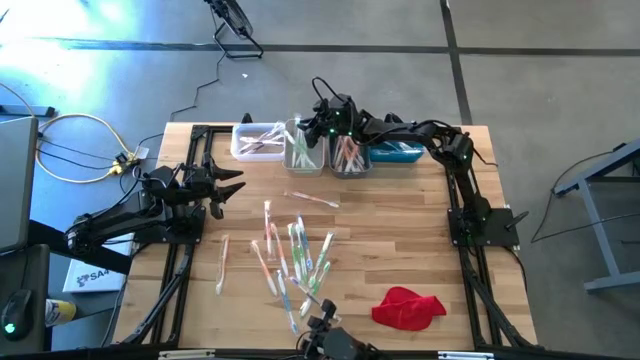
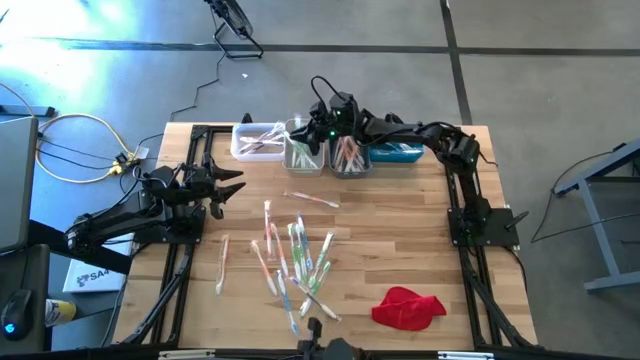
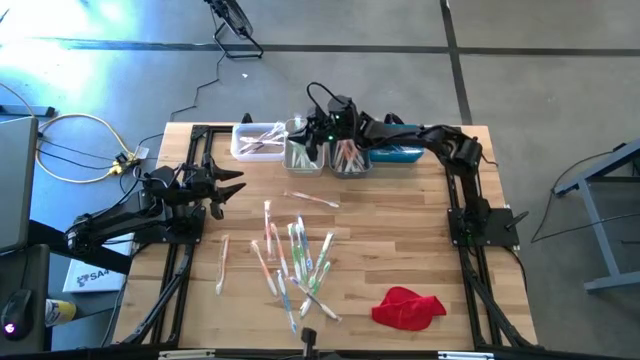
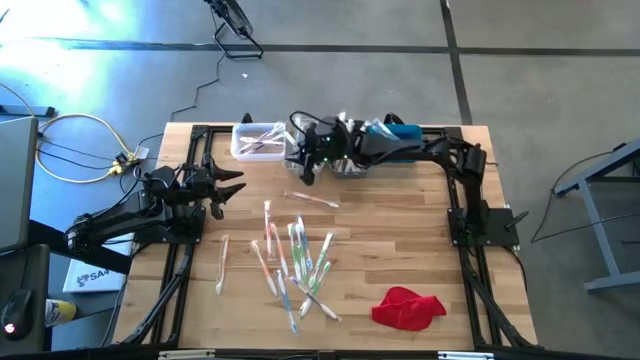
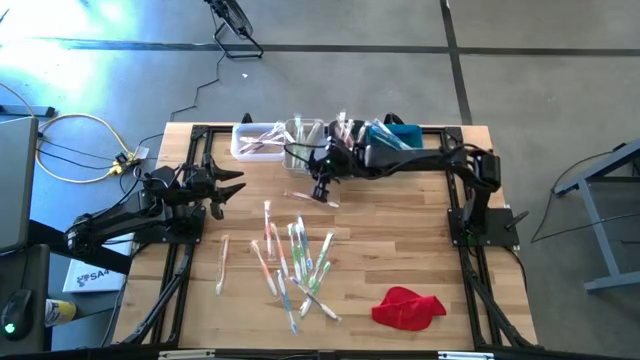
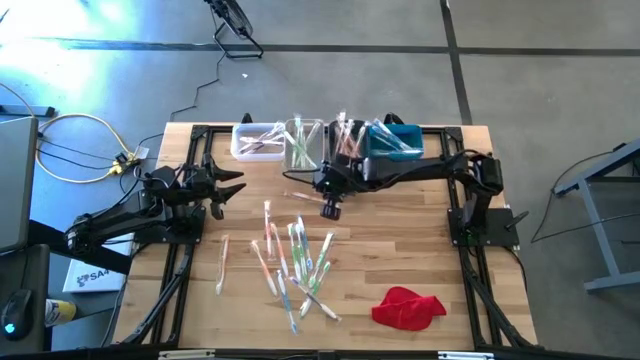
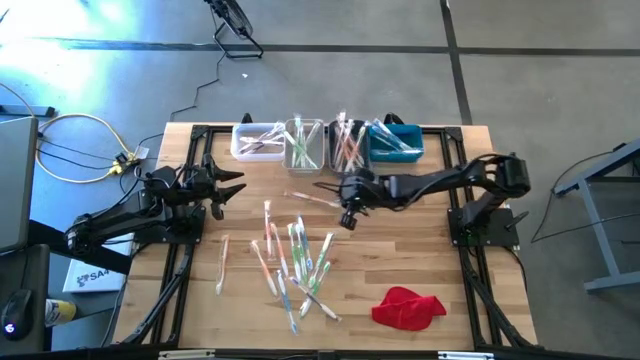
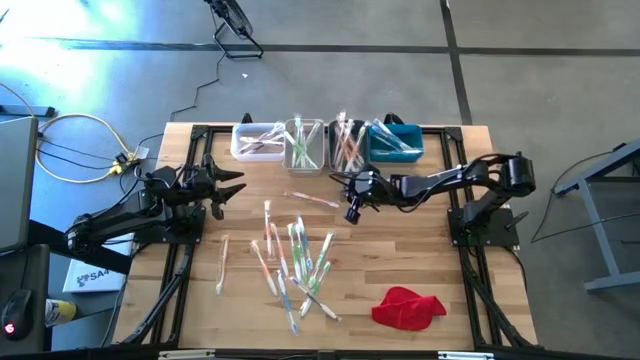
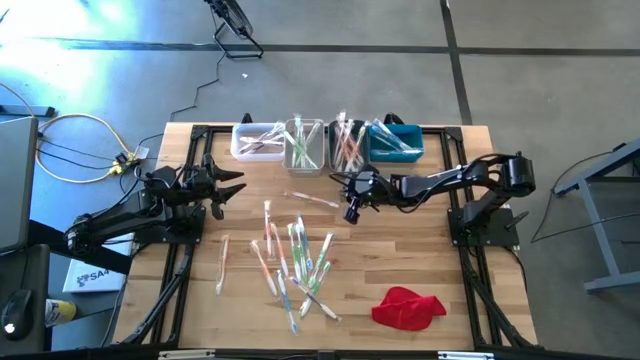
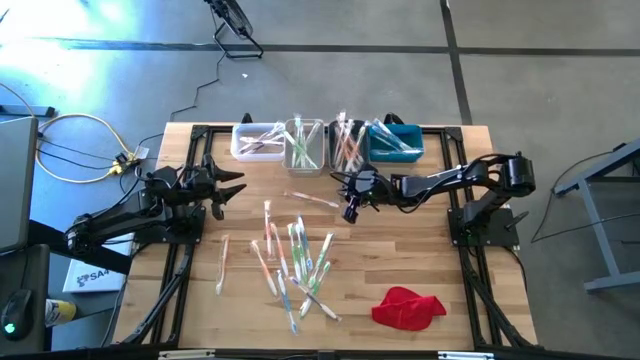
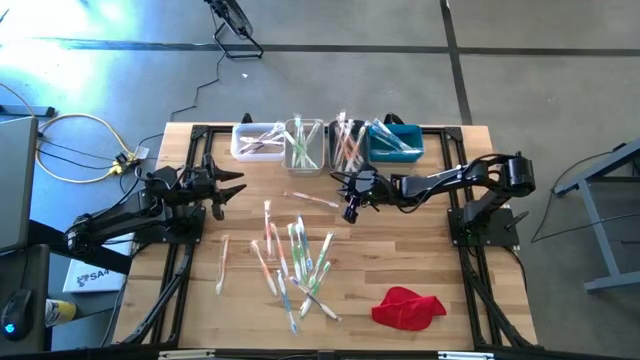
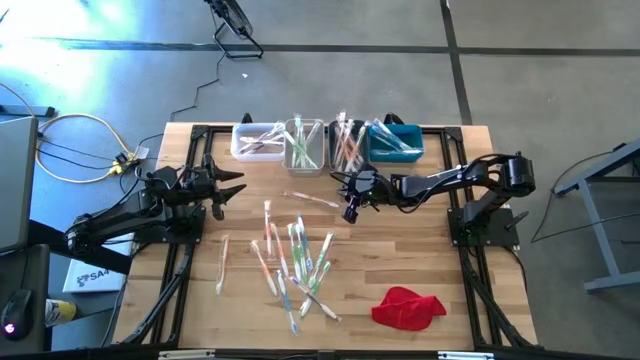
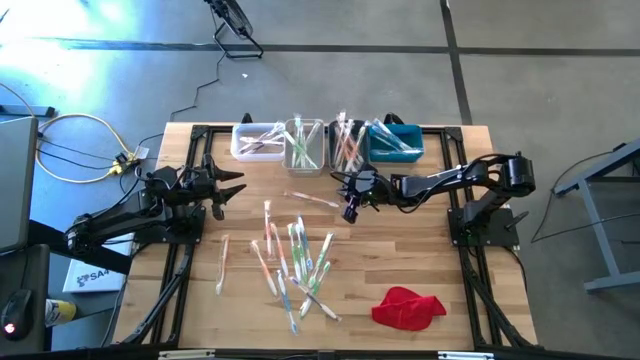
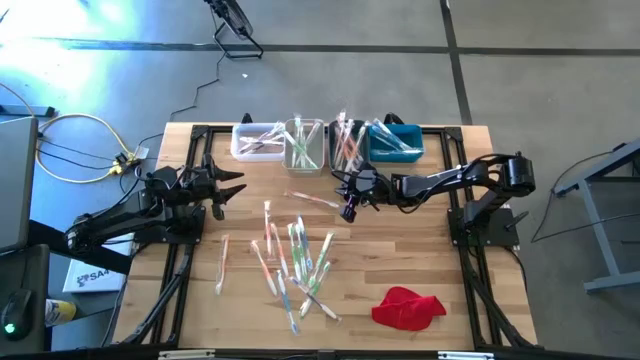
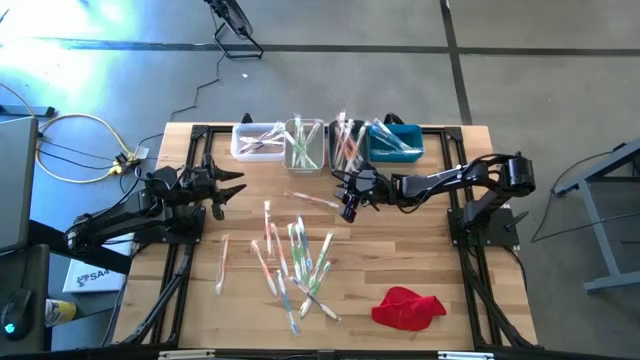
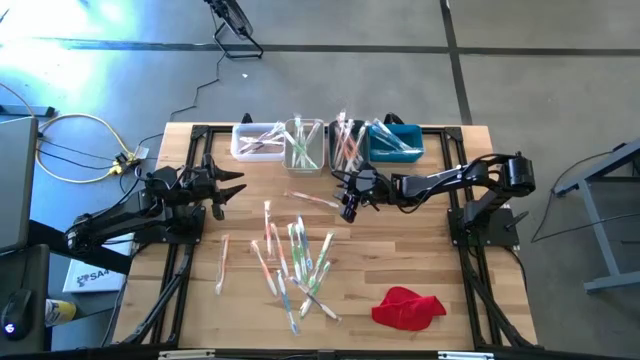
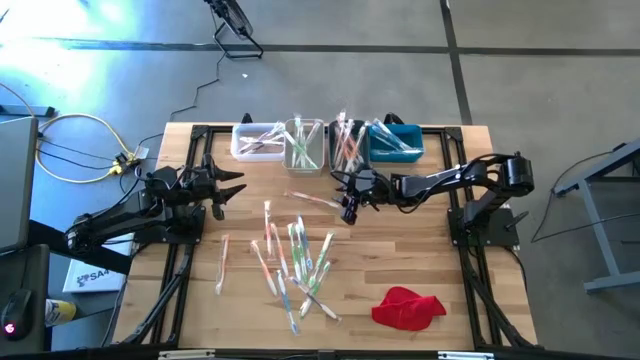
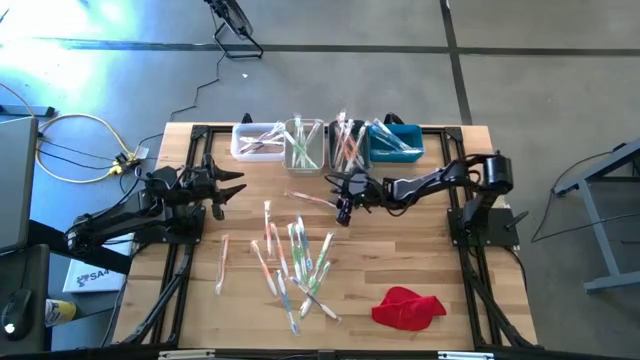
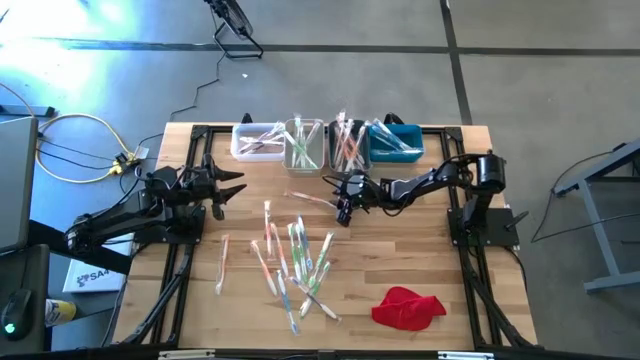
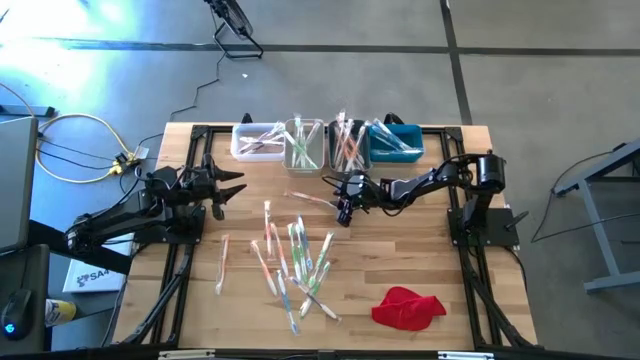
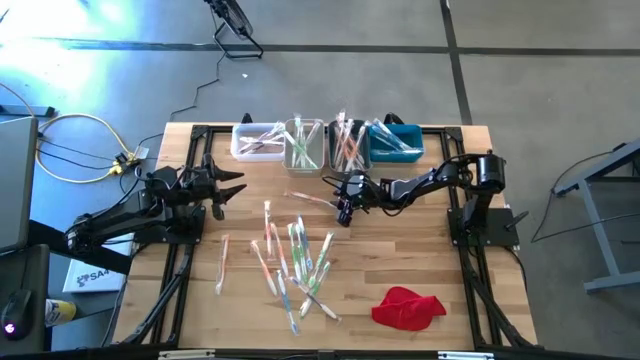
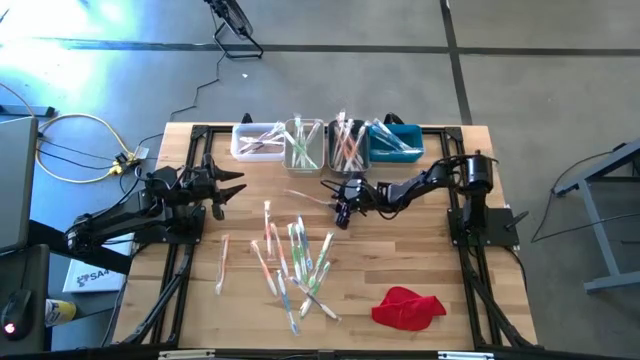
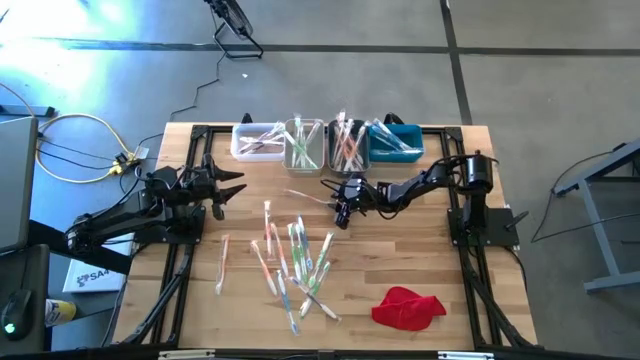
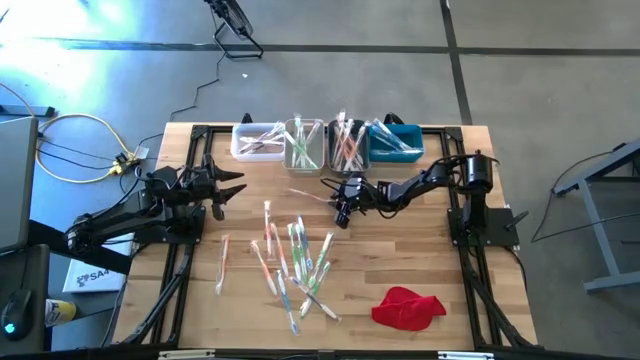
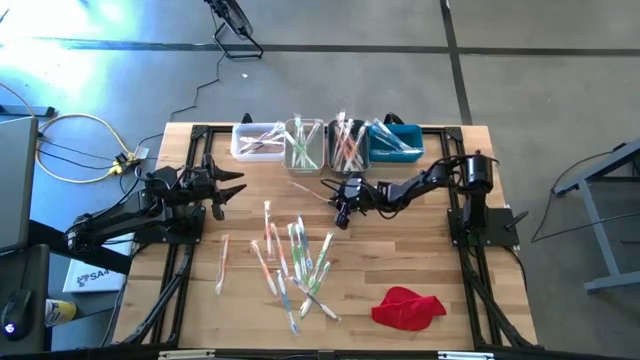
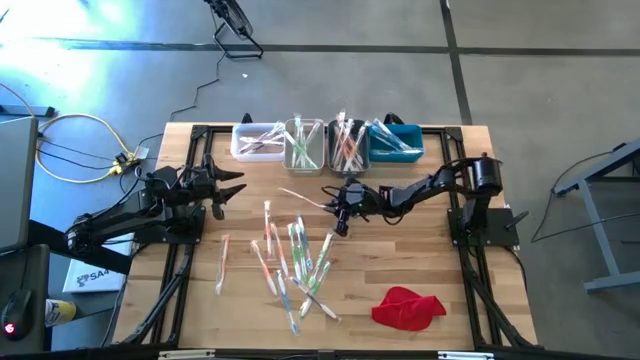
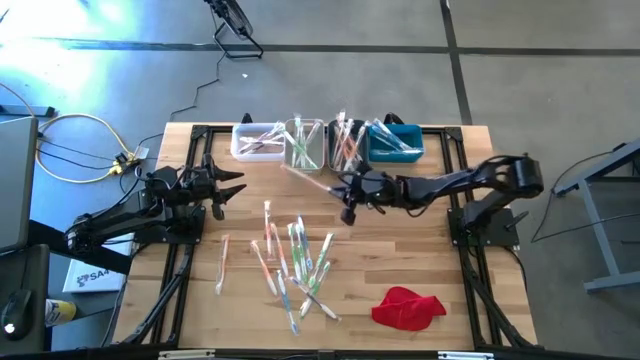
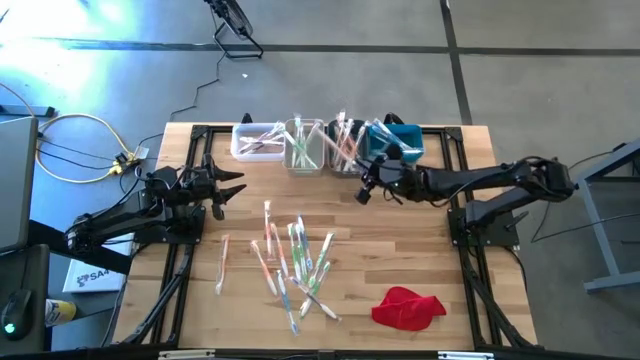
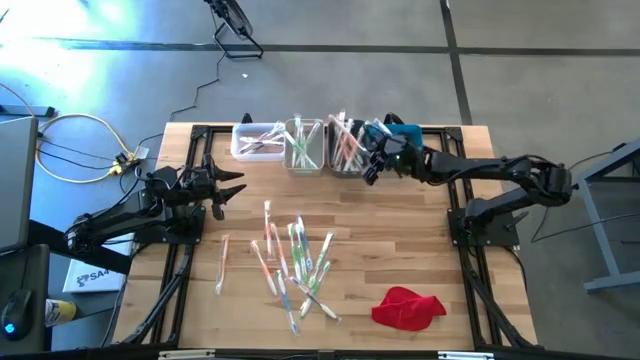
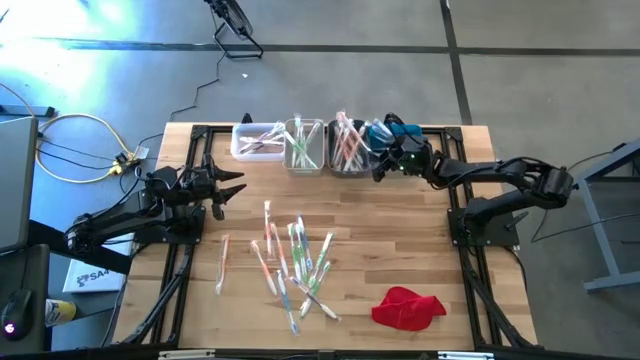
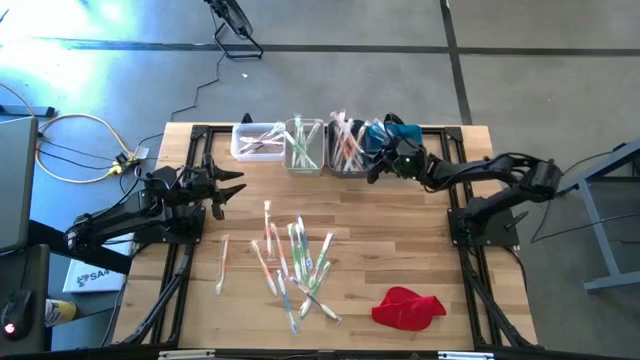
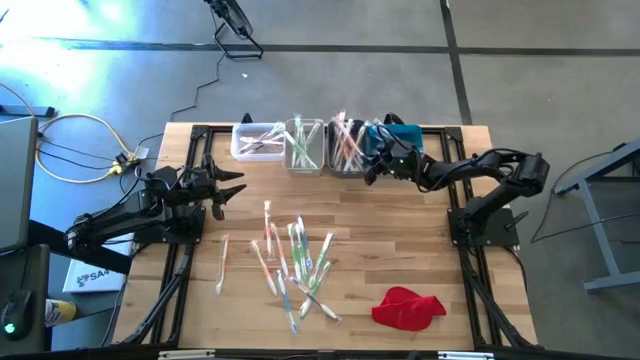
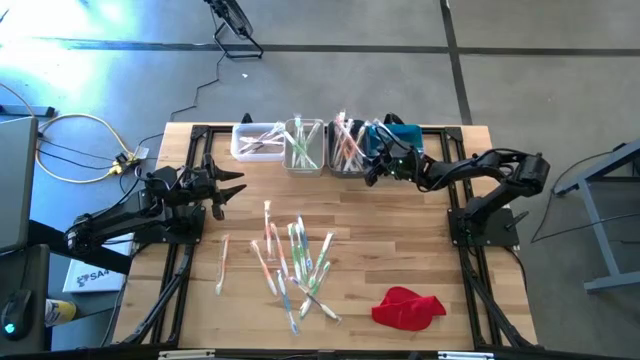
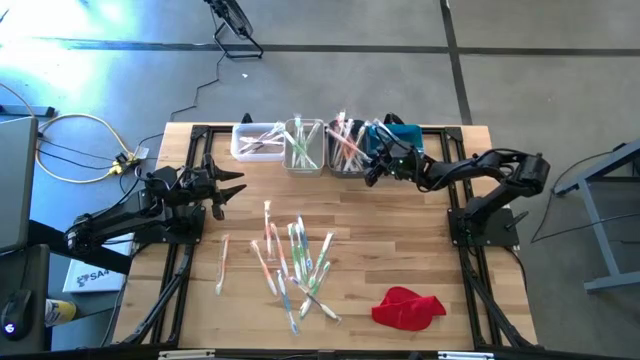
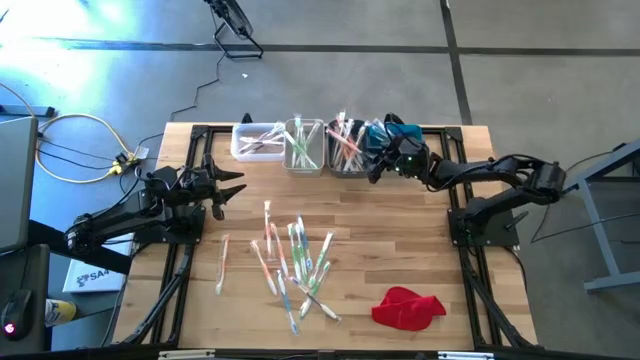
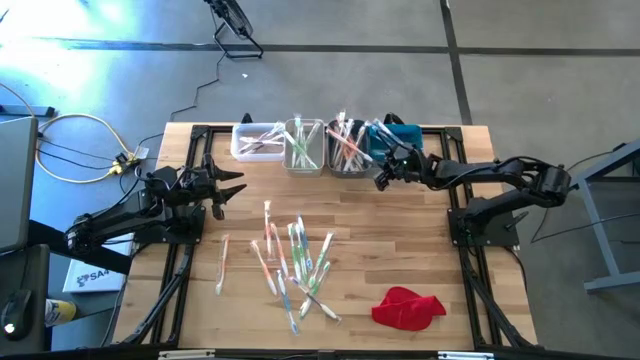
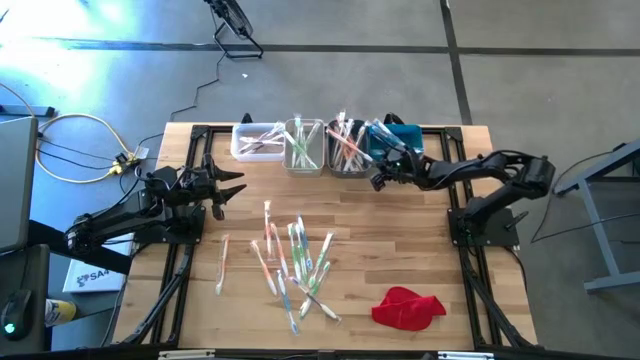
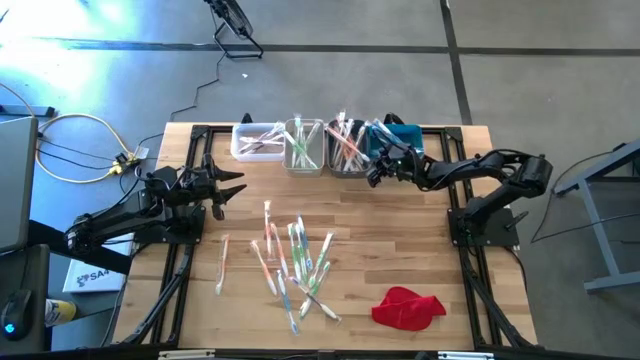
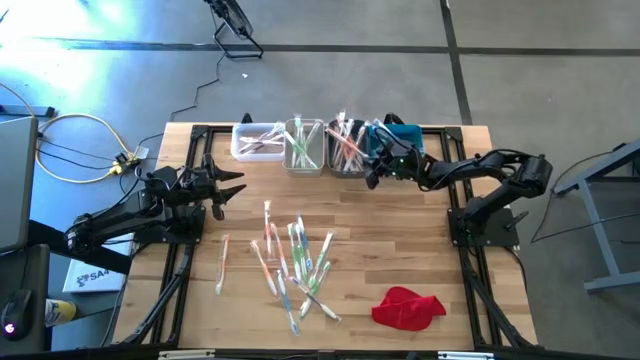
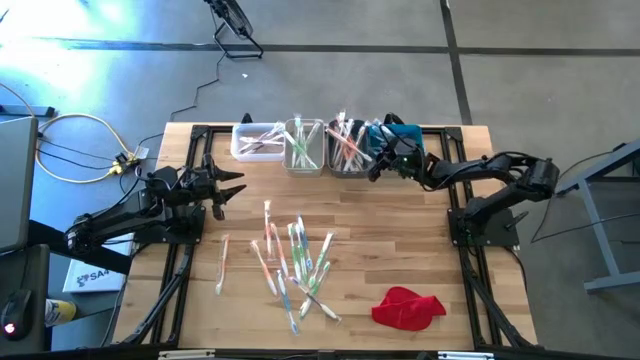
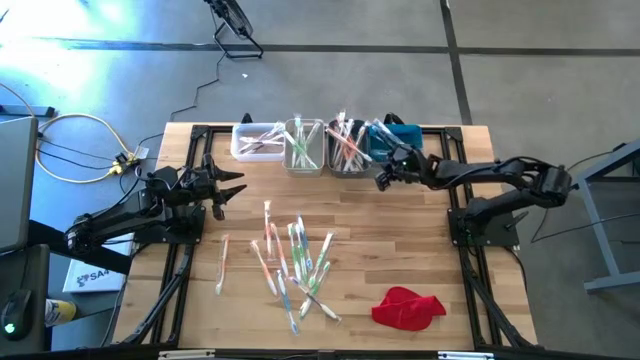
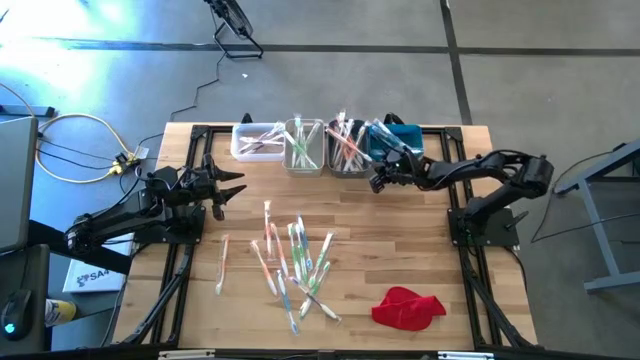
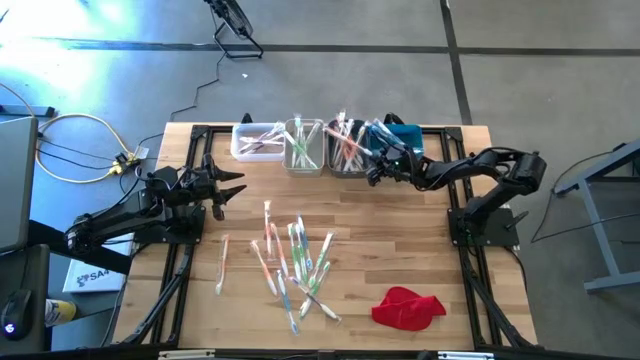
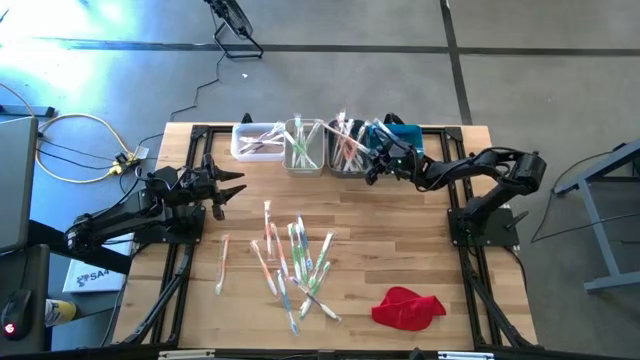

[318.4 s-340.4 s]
Task: Pick & Place Toothbrushes
Put the orange toothbrush into the dark green bin
